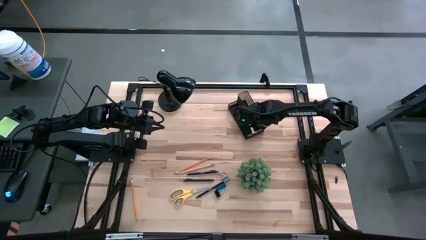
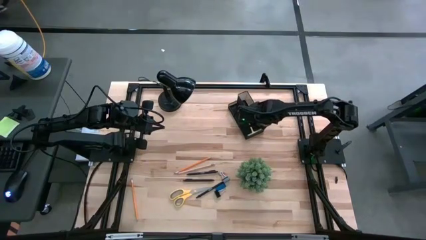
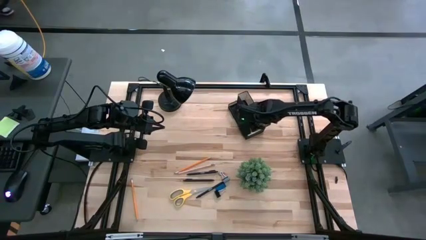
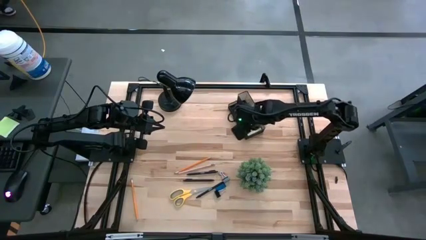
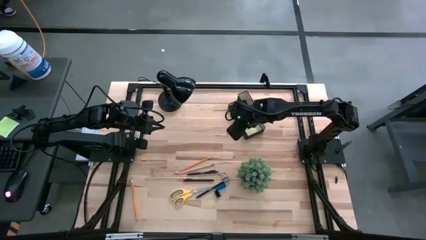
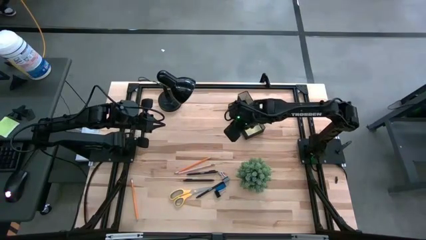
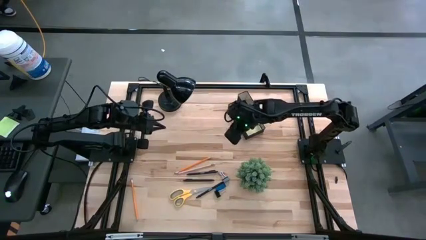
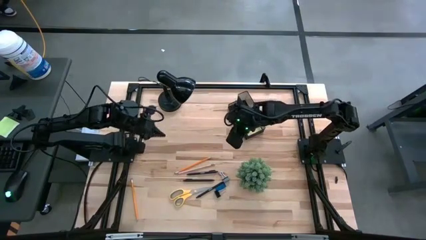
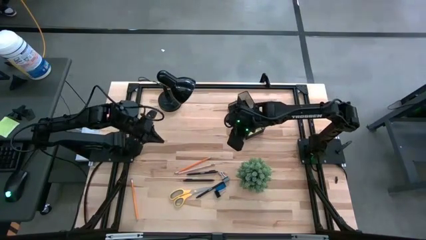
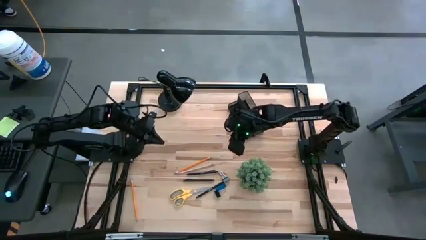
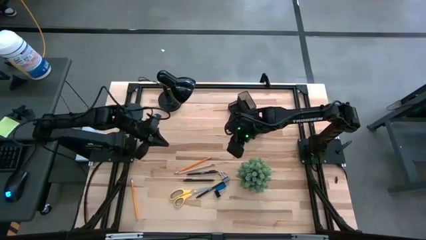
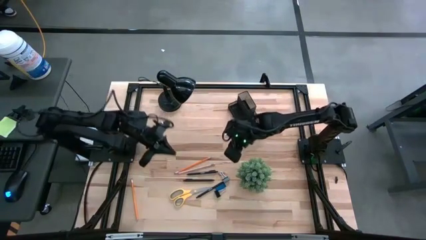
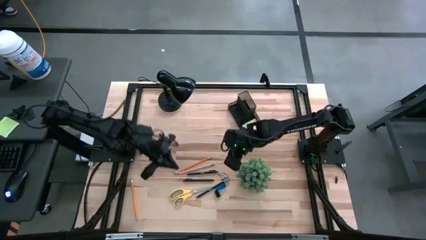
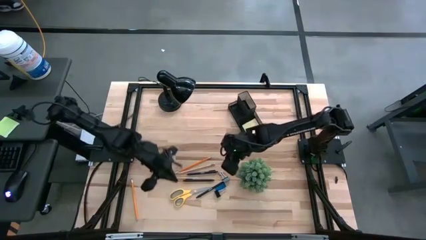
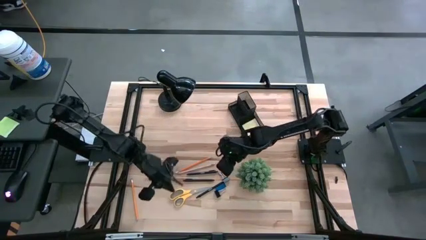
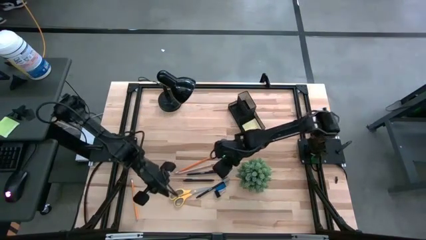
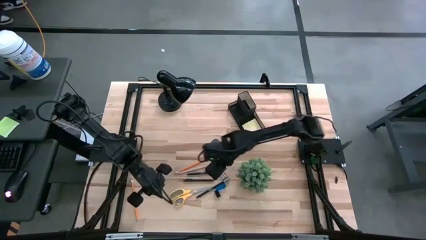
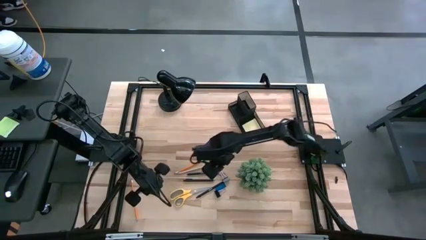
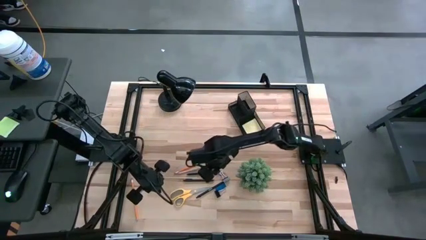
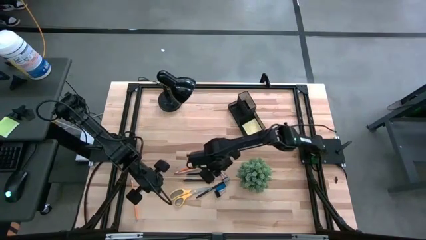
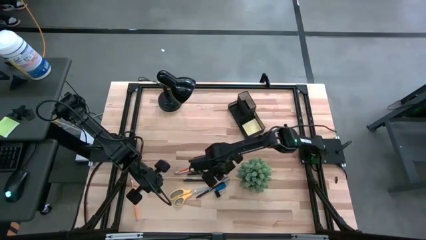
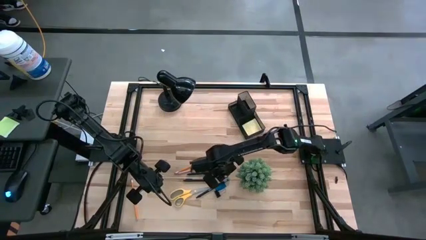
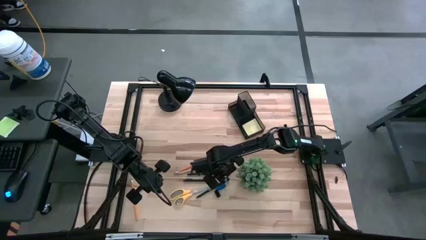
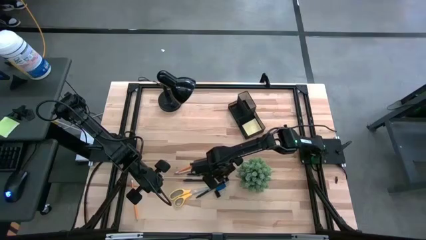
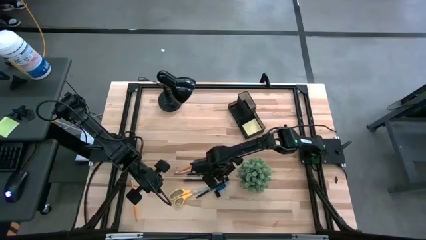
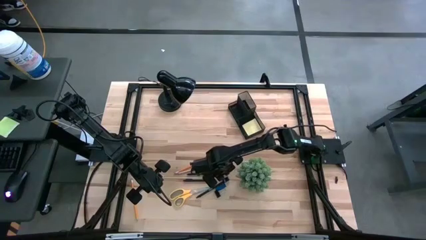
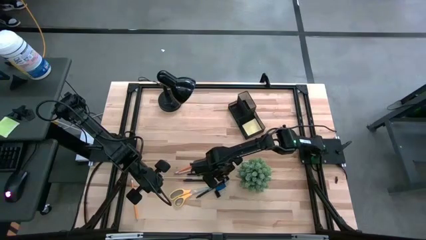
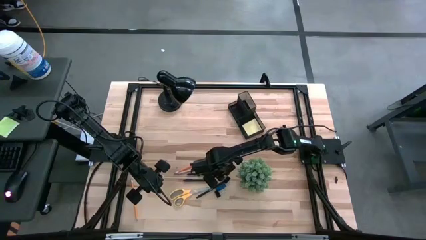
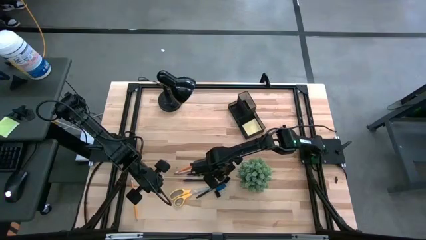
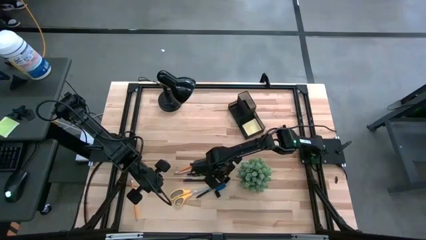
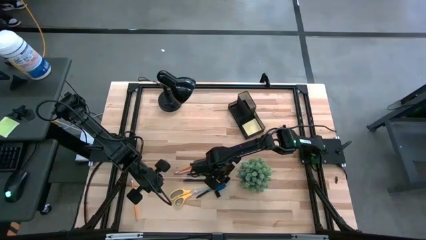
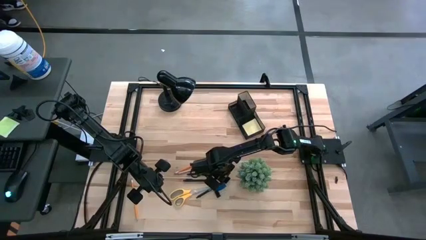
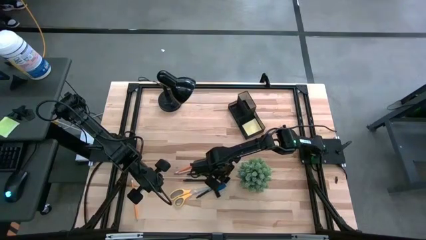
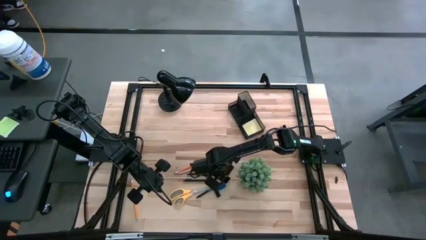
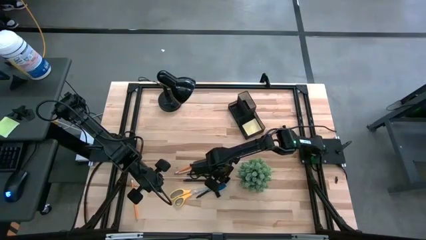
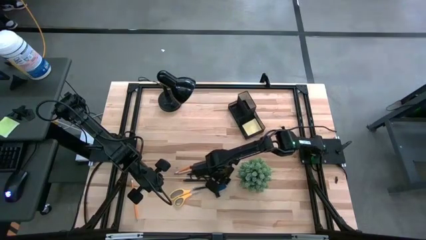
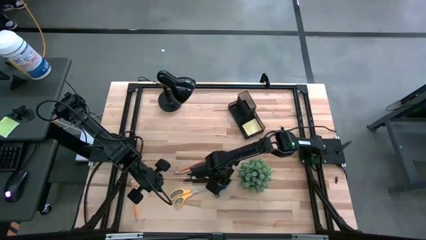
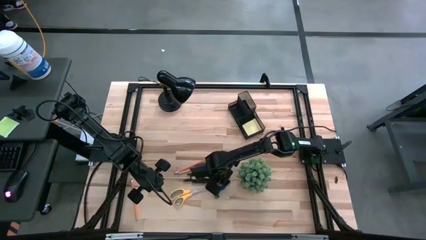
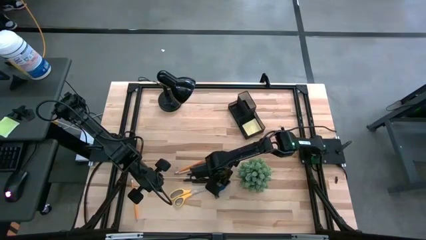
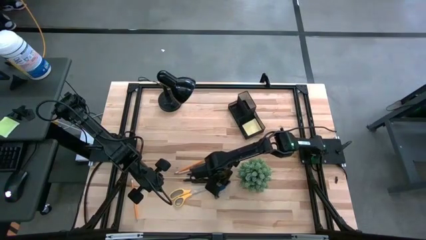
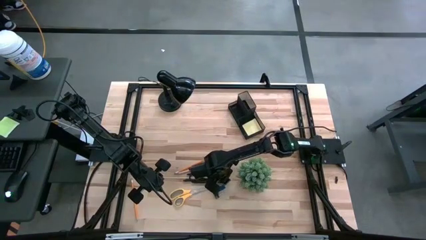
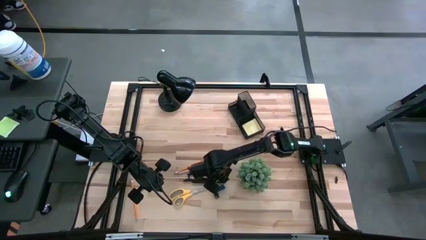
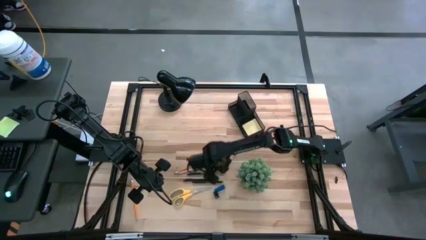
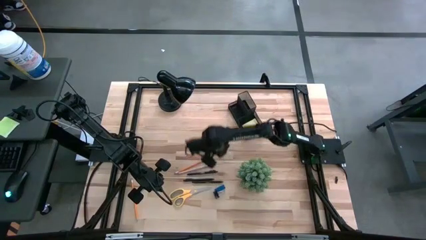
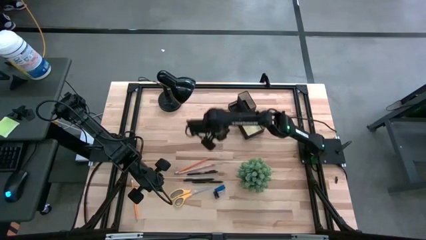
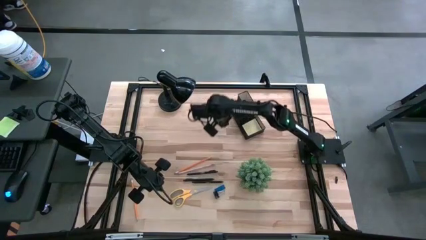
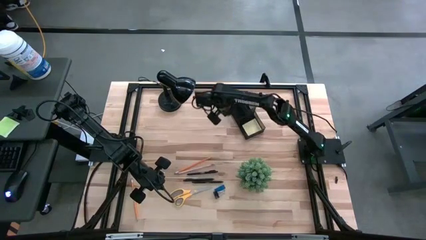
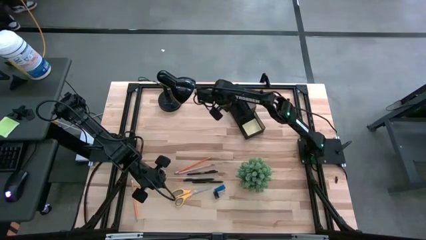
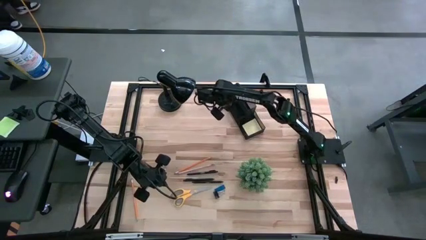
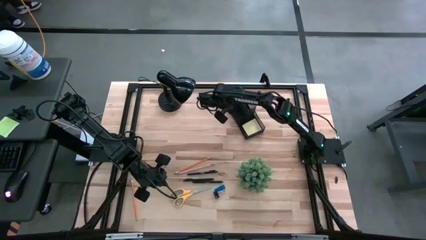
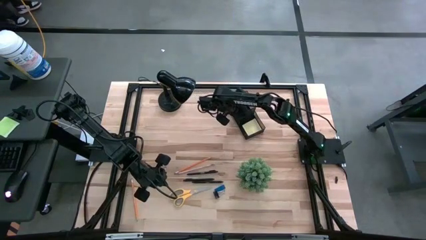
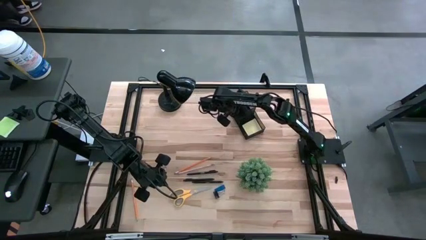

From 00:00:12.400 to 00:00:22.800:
Task: Pick and place office supplies into organizer
Put the top binder clip into the desk organizer

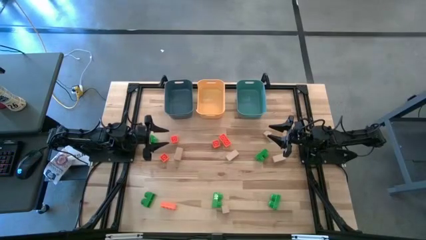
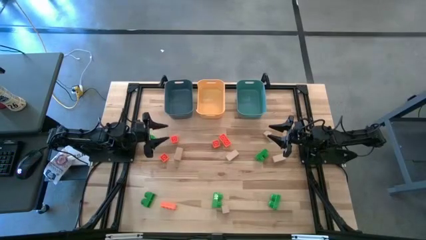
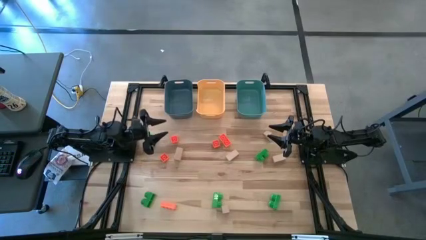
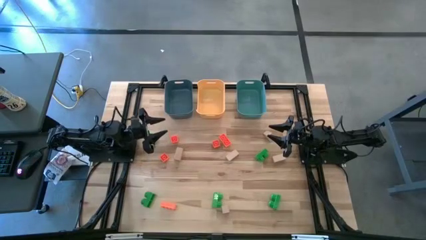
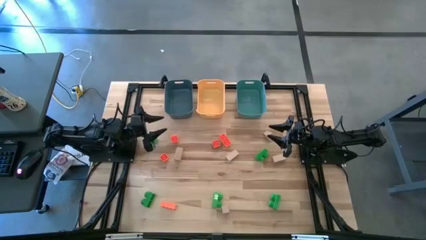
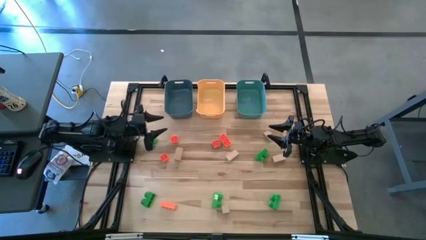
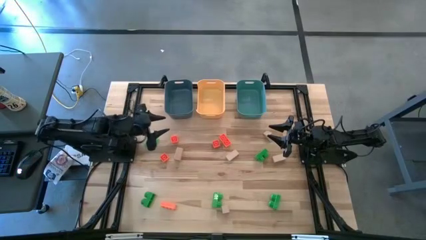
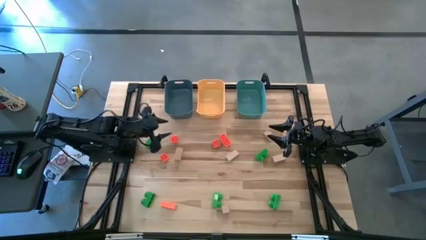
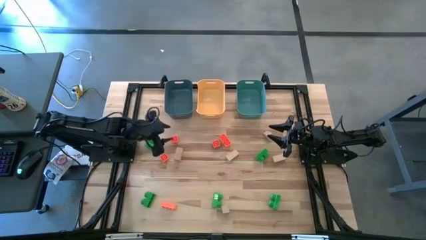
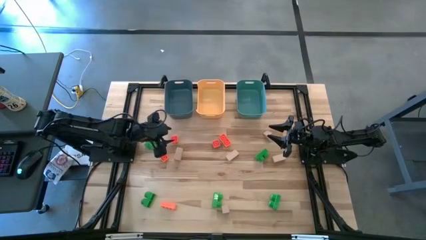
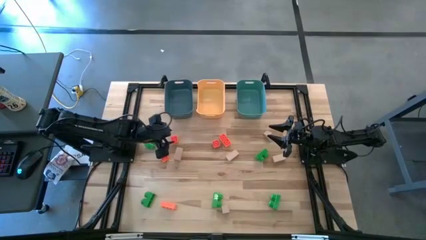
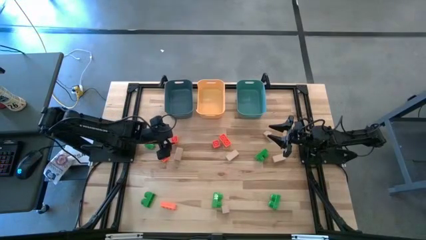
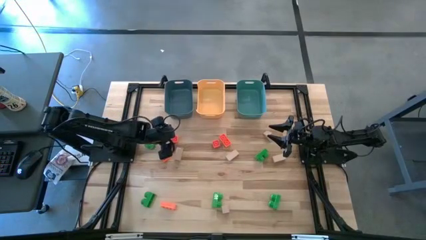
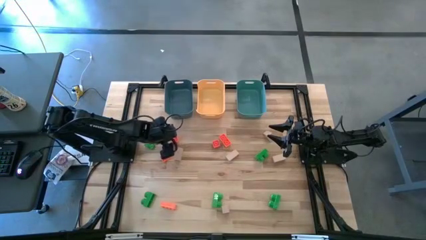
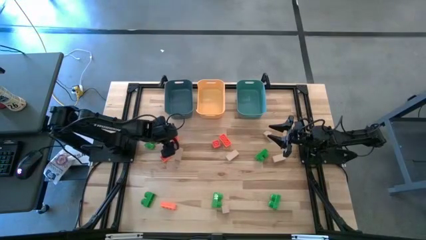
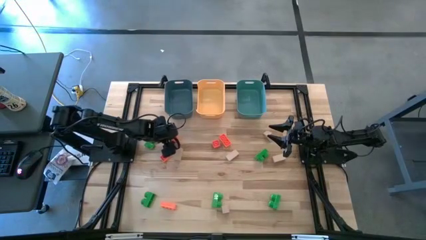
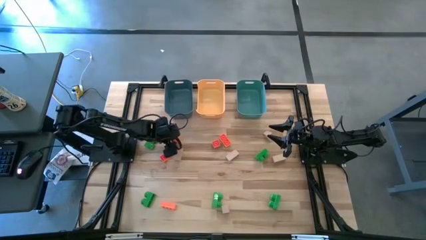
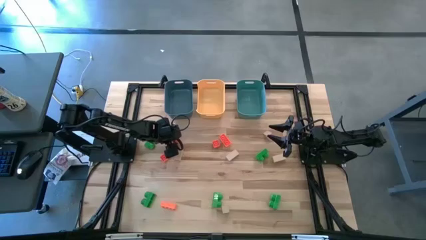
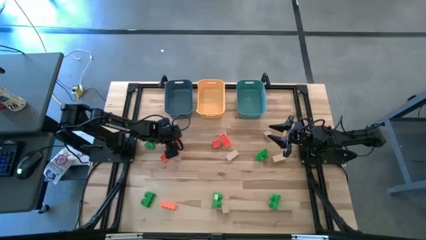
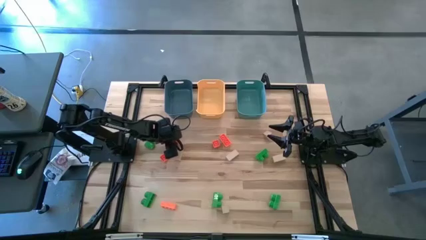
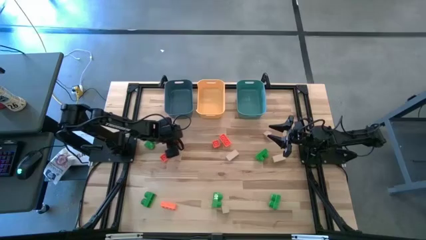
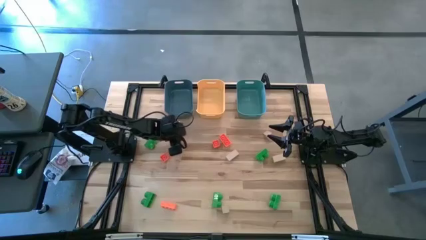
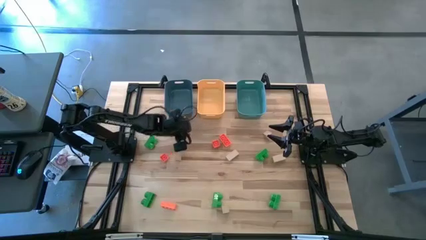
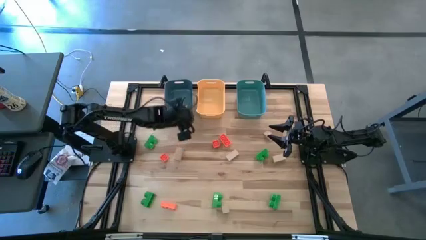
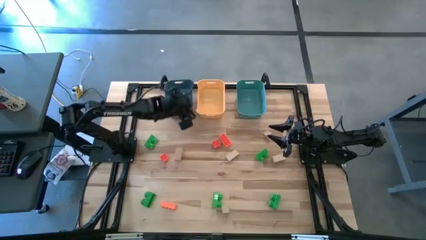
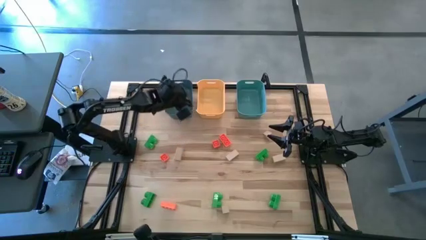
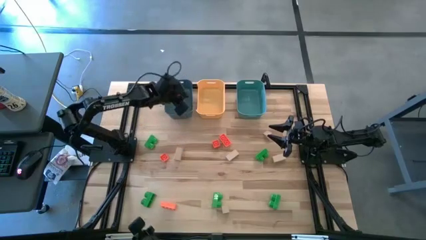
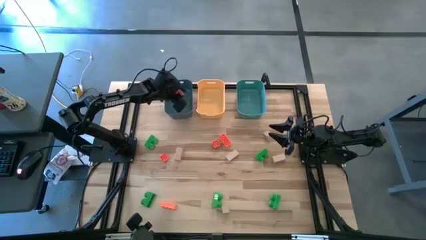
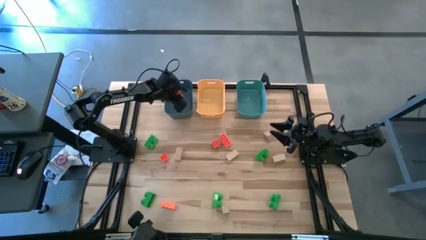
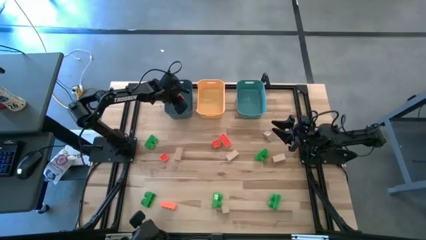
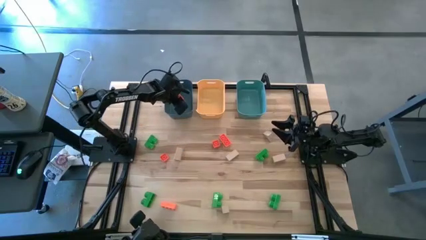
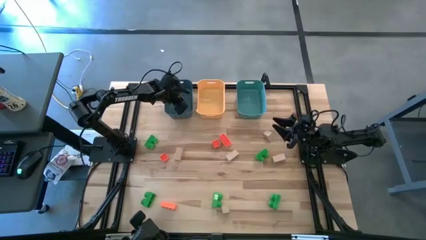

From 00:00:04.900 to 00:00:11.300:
Task: Sort & place blocks by color
Put the orange game piece into the blue bin
